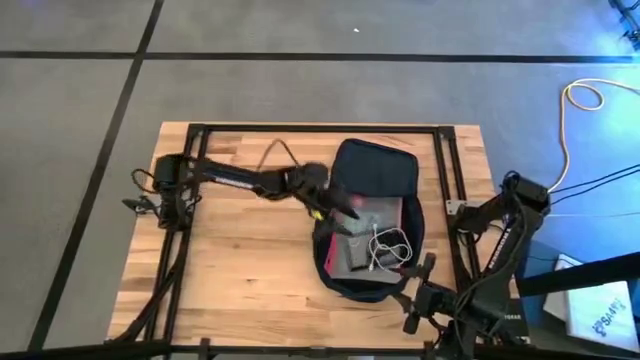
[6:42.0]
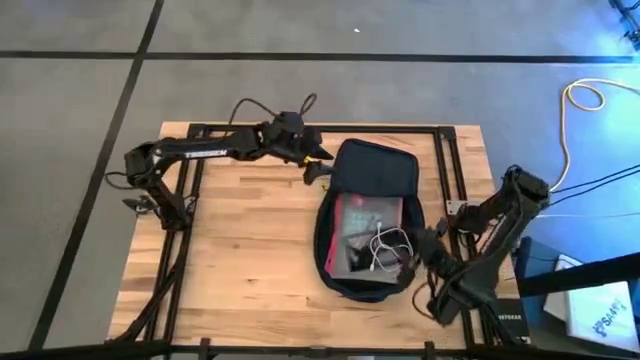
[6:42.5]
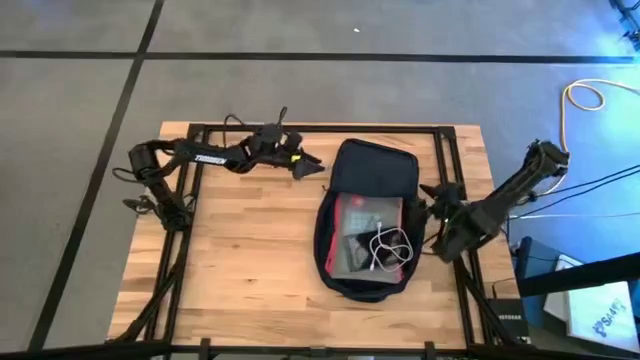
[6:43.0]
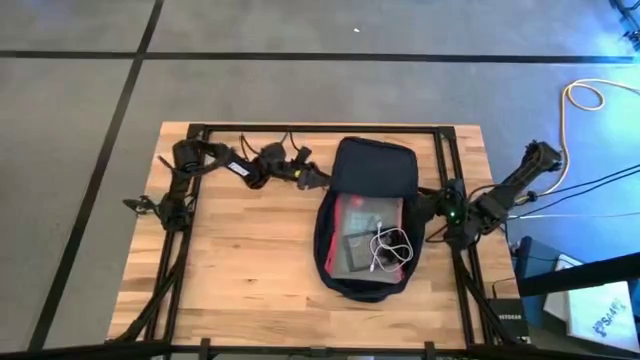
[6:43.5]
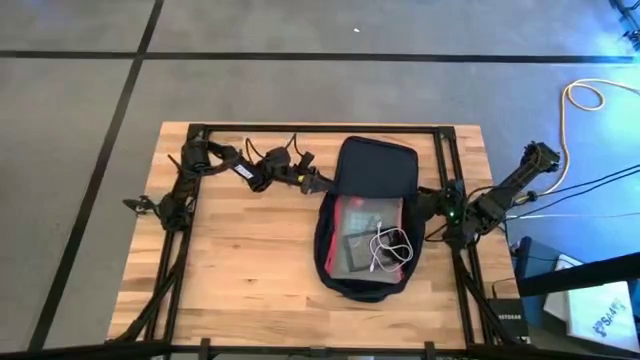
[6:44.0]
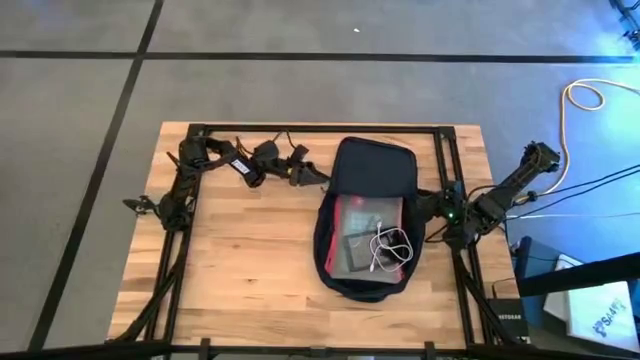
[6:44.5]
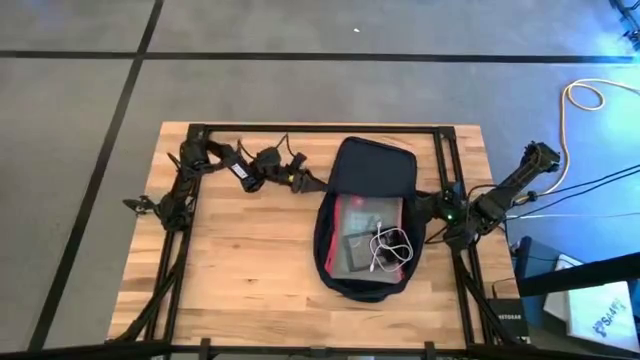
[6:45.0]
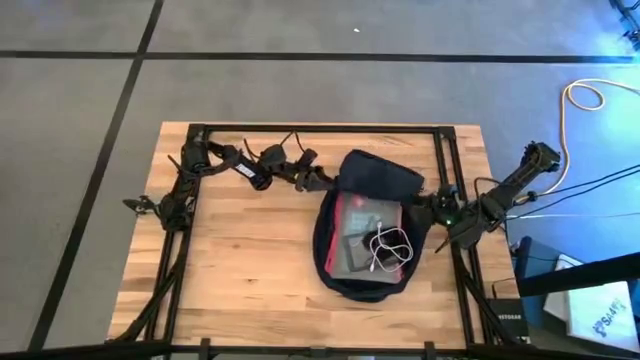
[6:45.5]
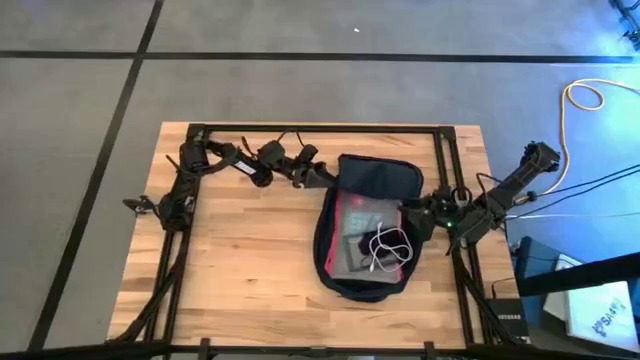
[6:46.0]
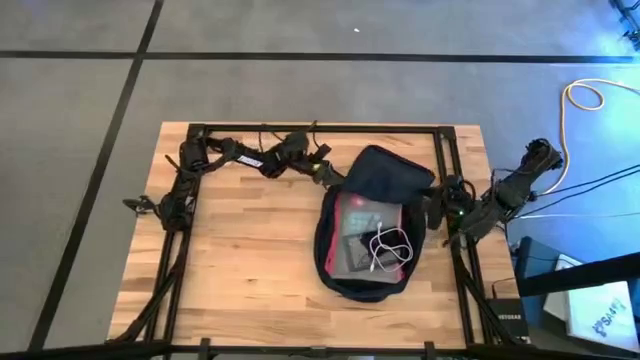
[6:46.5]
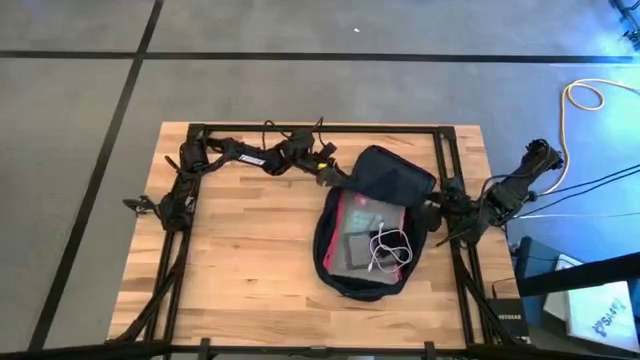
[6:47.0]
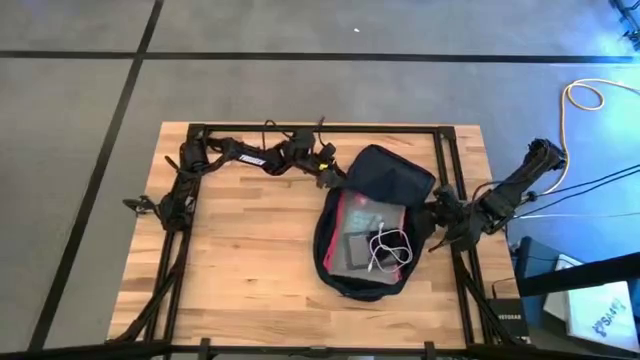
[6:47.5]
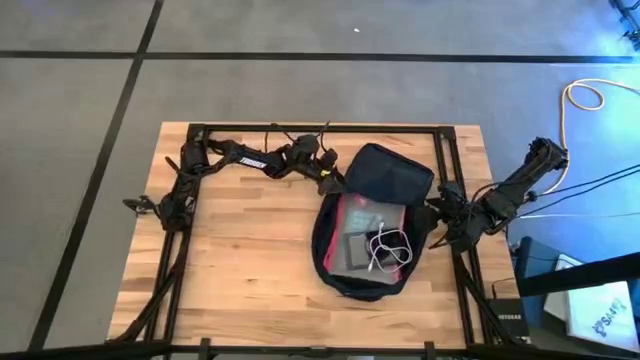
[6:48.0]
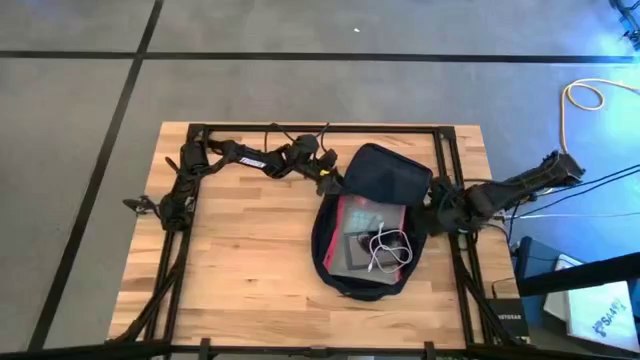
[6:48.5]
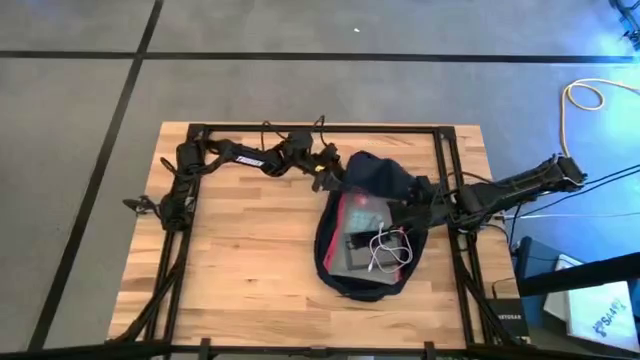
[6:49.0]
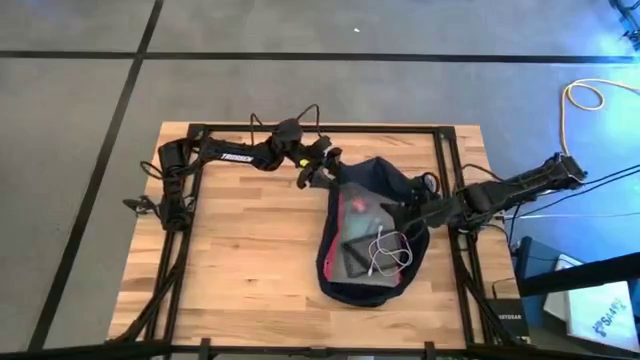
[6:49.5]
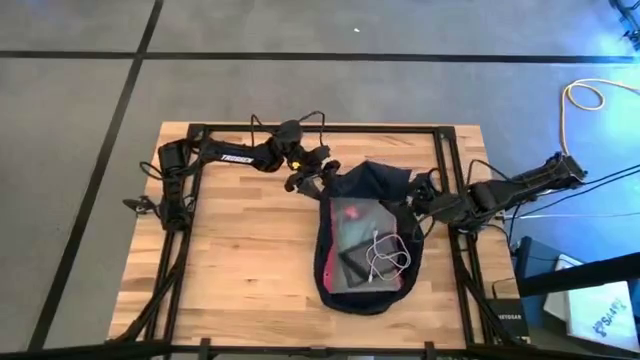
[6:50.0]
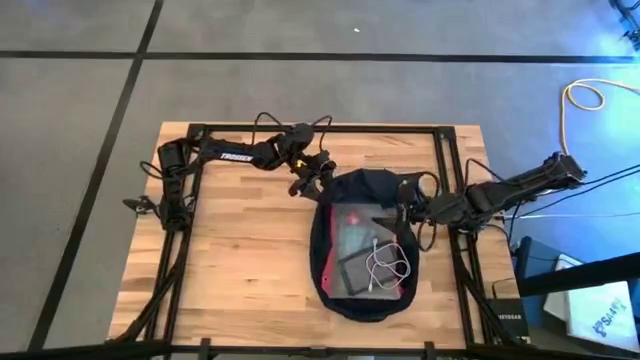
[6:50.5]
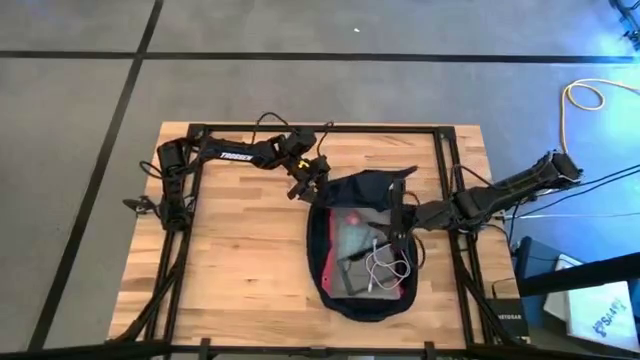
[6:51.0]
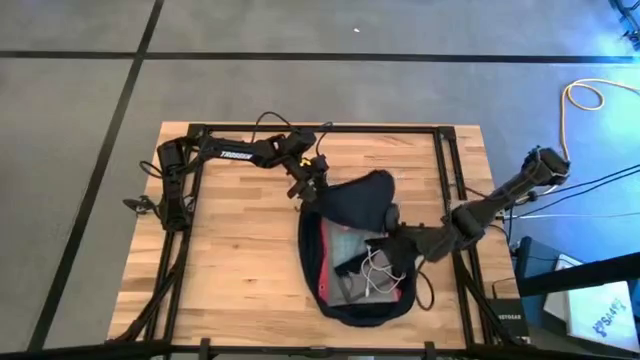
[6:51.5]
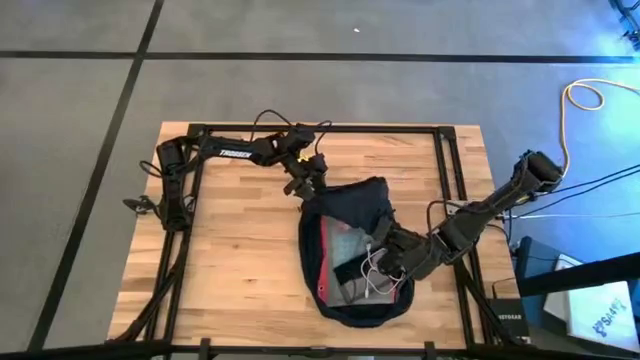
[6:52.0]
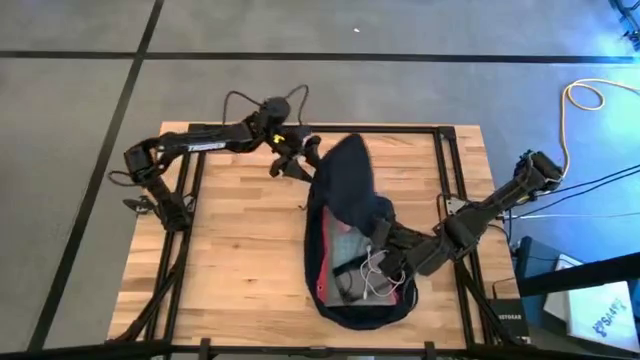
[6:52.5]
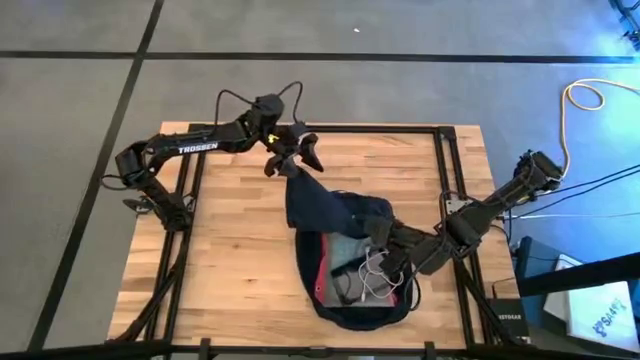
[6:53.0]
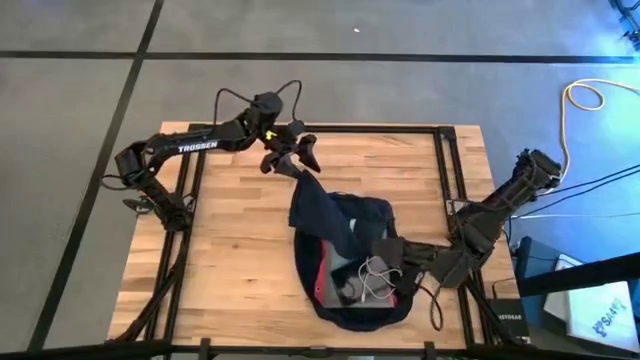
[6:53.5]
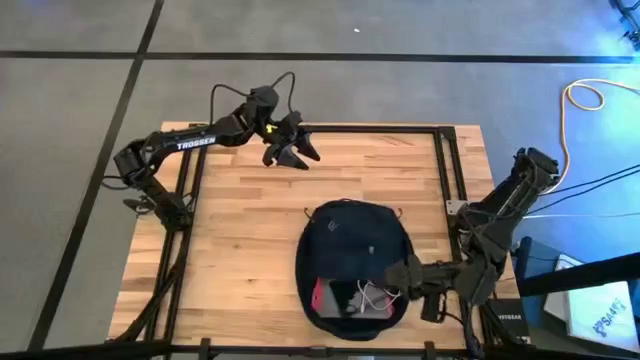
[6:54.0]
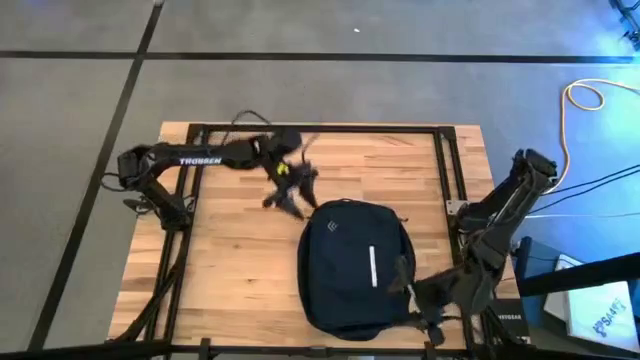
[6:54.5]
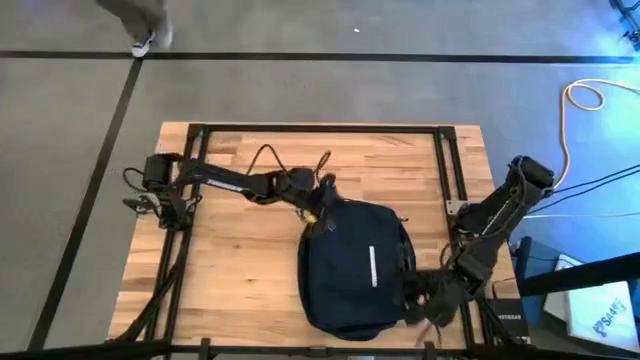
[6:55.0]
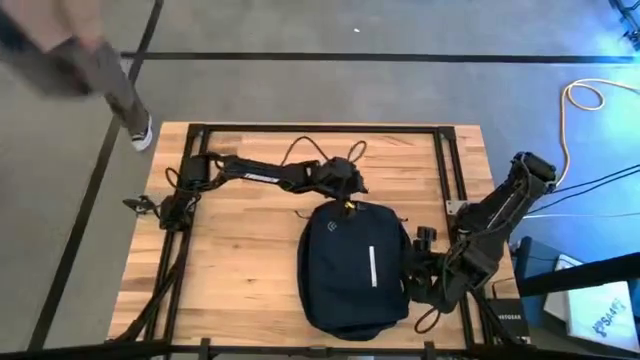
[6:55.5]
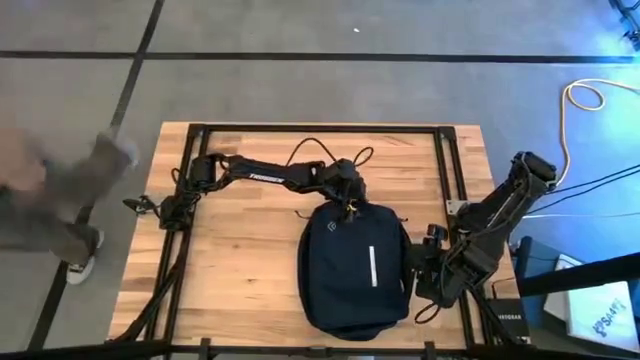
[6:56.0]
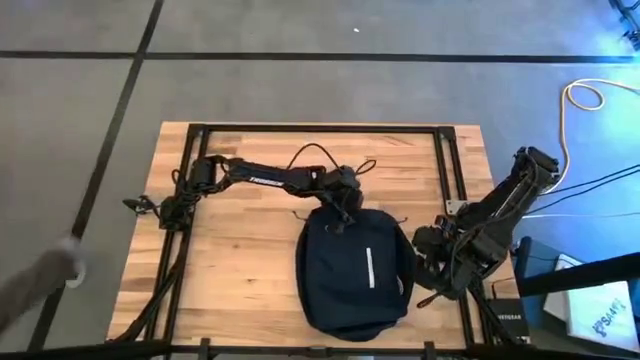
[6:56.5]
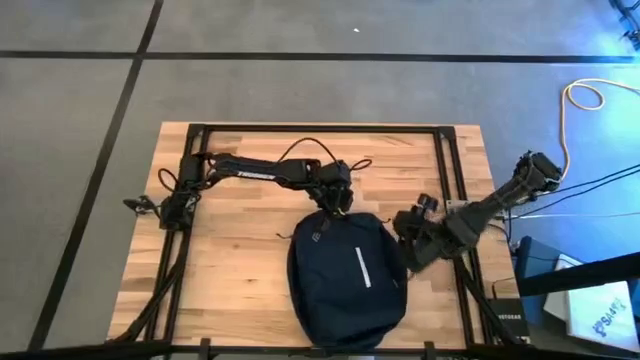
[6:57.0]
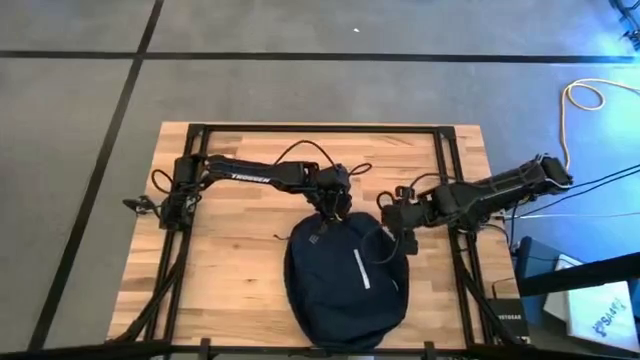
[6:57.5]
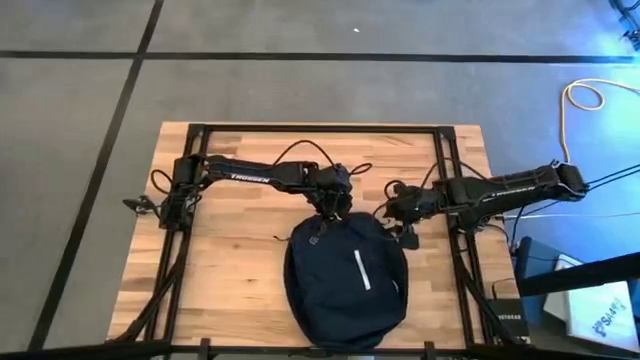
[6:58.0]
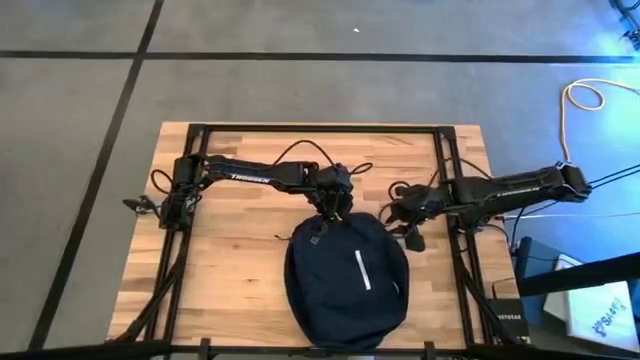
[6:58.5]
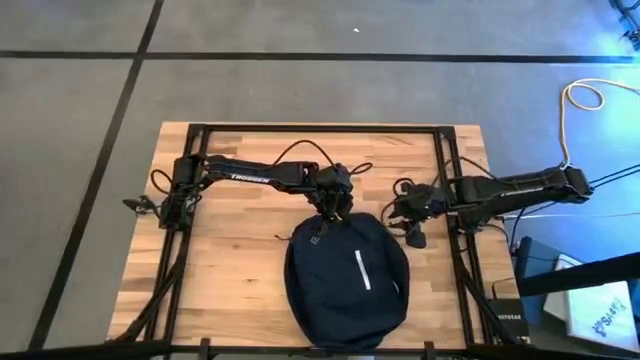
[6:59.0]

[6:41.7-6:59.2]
Task: Unpack backpack
Close the blue backpack

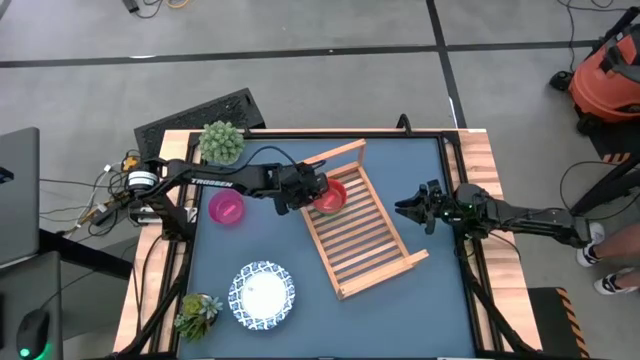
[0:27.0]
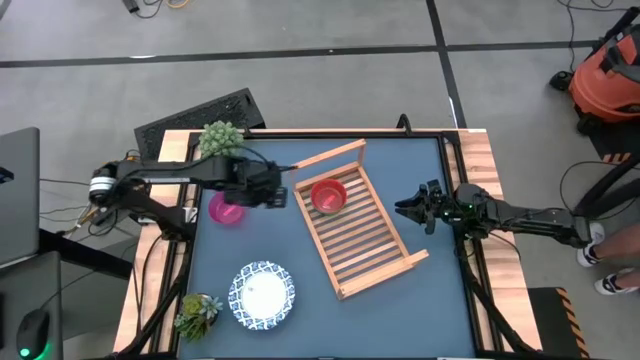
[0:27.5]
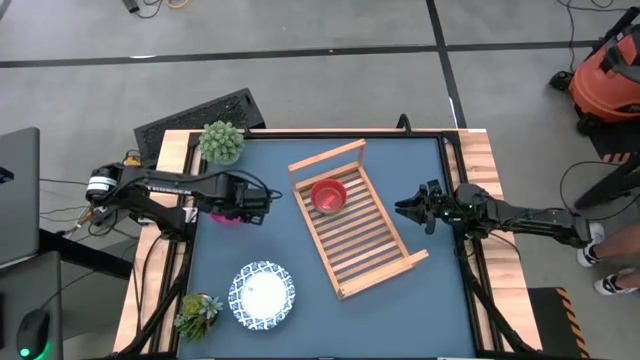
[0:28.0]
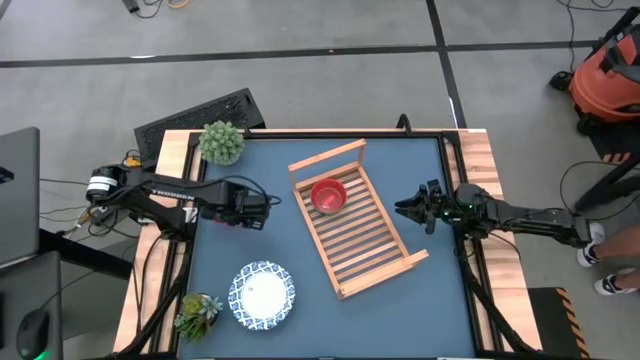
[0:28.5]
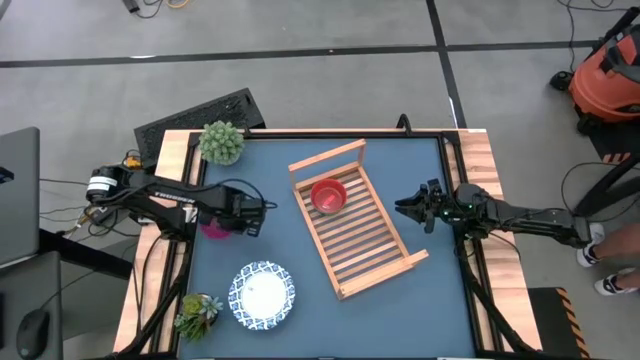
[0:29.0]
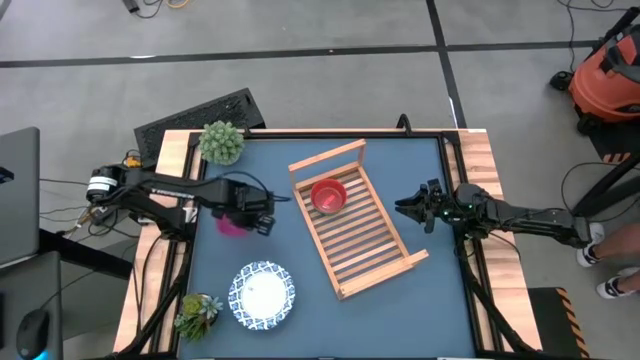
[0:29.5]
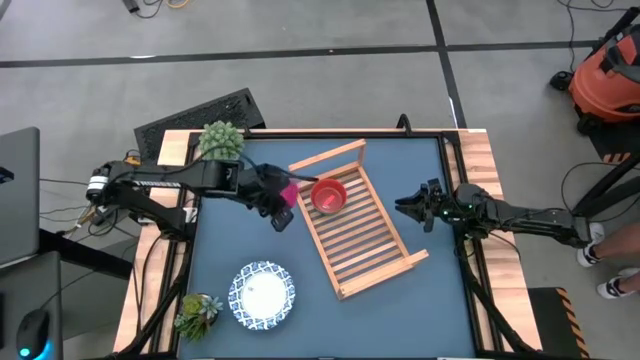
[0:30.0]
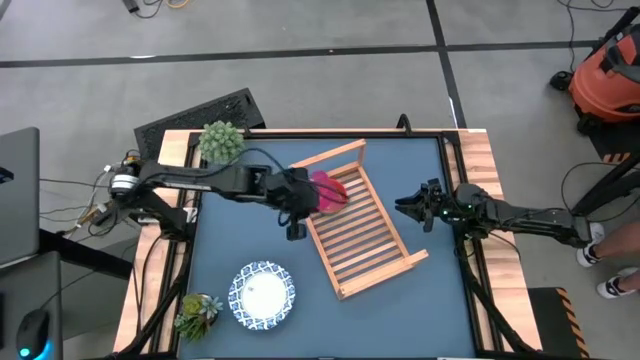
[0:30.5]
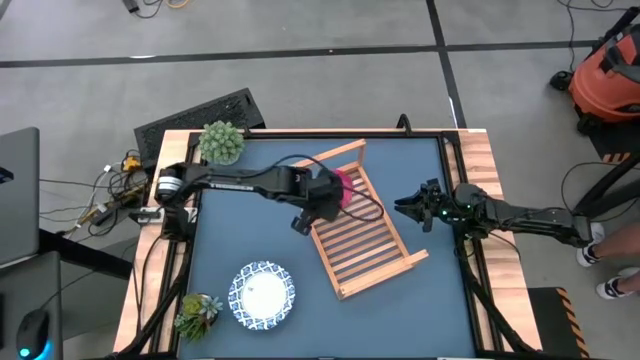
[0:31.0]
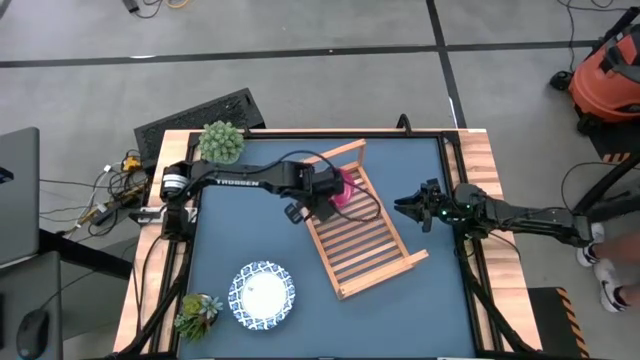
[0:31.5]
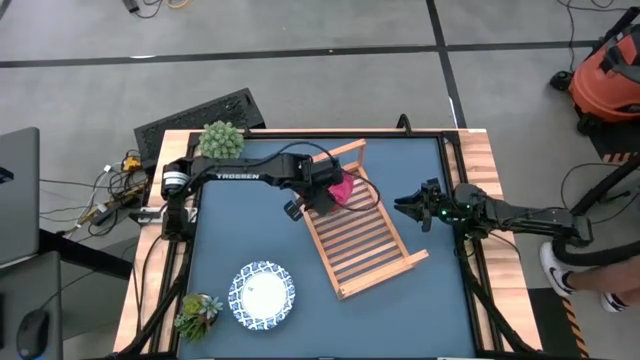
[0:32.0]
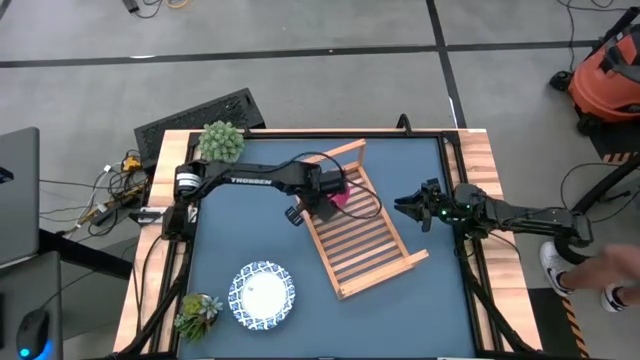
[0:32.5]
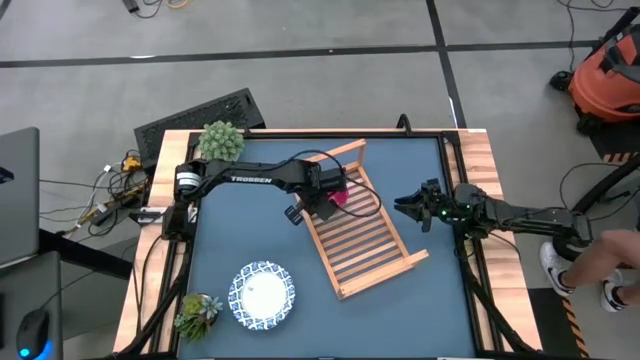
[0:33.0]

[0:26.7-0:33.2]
Task: Place and stack bowls onto a shelf
Stack the pink bowl on top of the orange bowl
